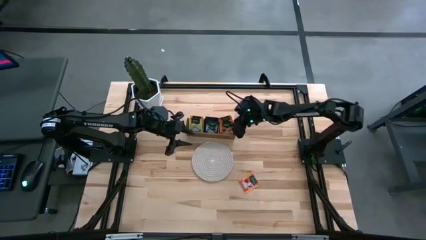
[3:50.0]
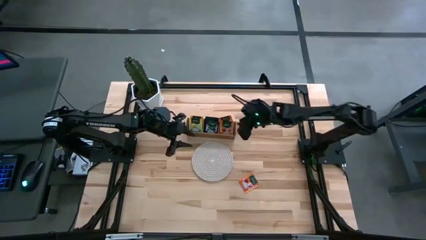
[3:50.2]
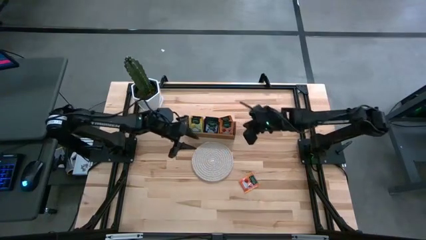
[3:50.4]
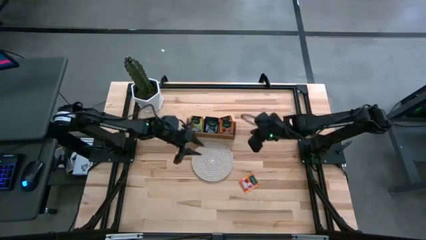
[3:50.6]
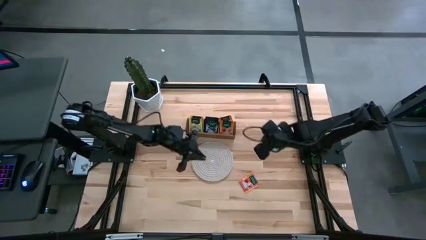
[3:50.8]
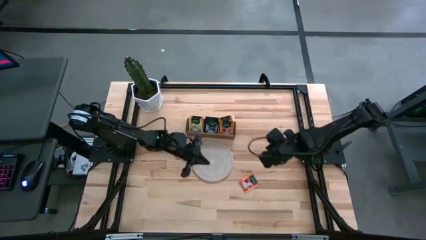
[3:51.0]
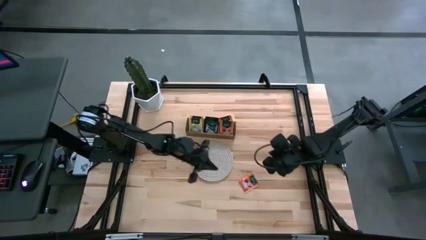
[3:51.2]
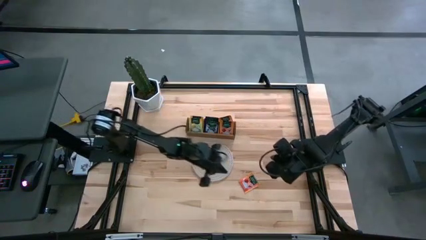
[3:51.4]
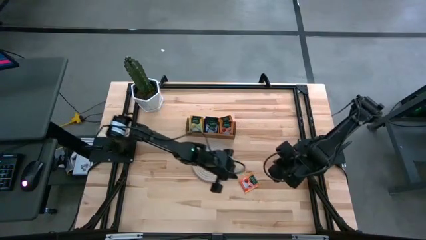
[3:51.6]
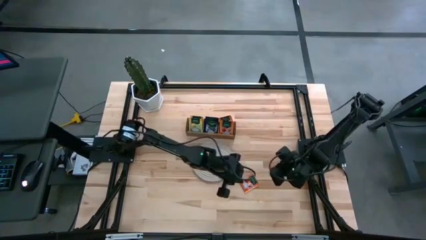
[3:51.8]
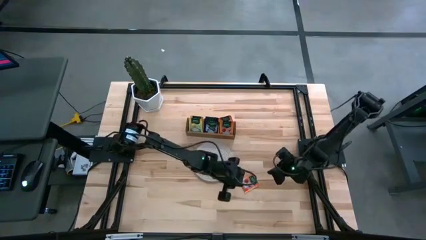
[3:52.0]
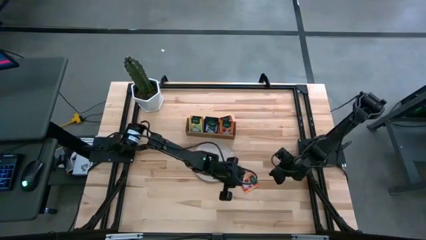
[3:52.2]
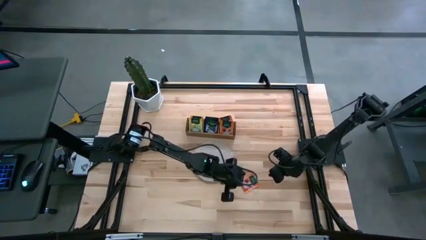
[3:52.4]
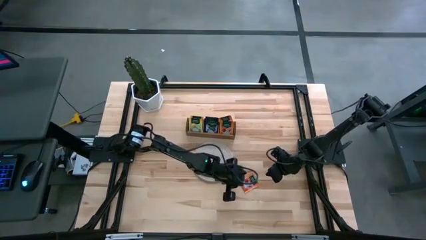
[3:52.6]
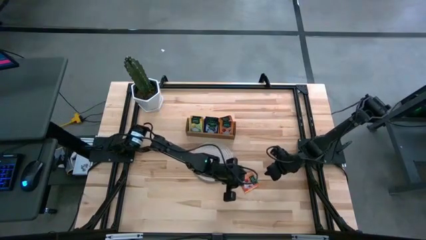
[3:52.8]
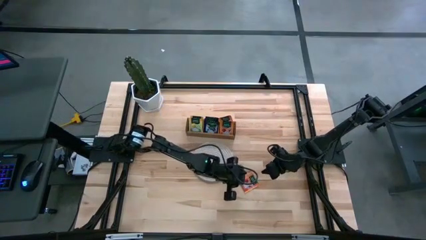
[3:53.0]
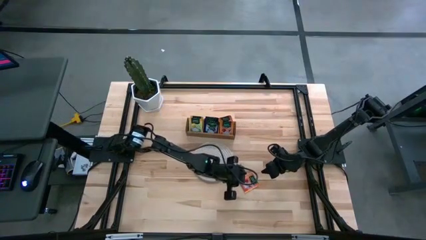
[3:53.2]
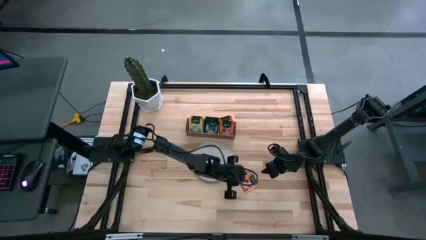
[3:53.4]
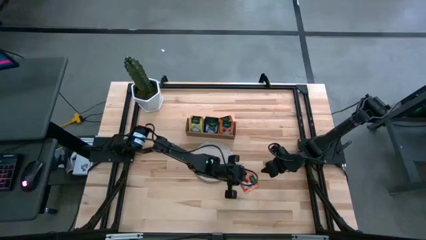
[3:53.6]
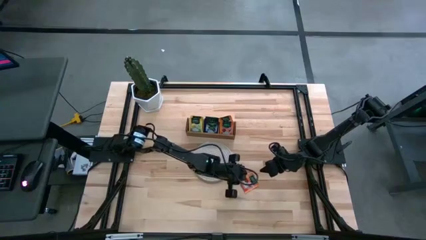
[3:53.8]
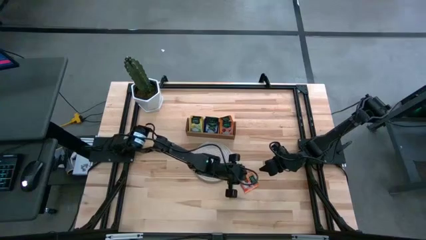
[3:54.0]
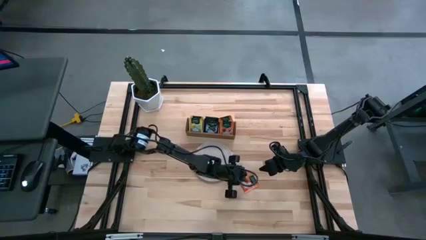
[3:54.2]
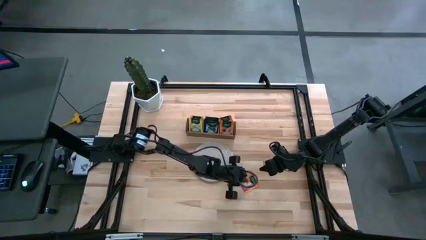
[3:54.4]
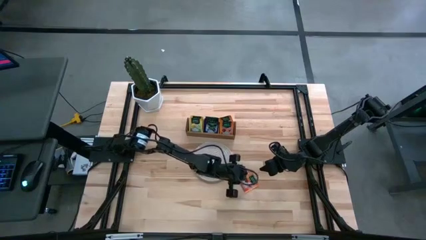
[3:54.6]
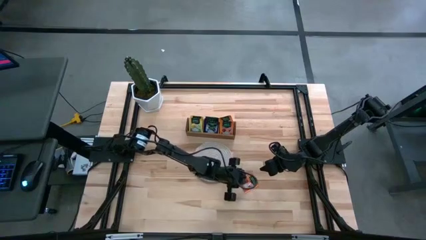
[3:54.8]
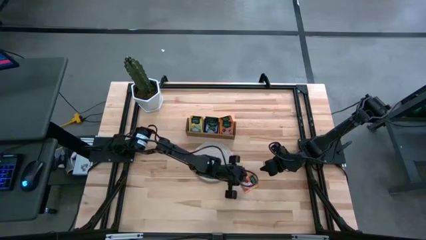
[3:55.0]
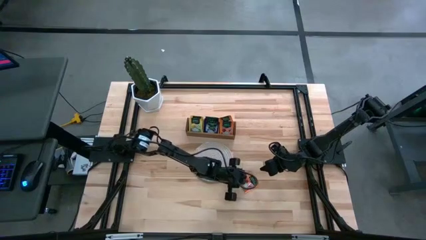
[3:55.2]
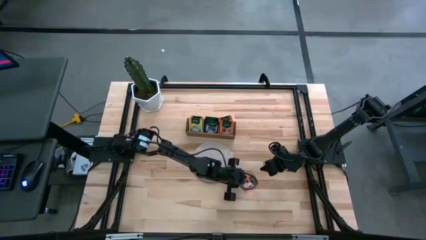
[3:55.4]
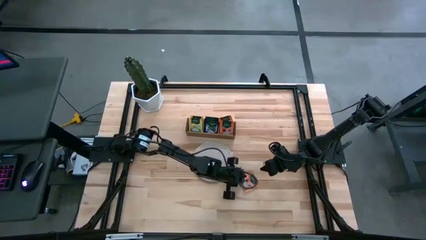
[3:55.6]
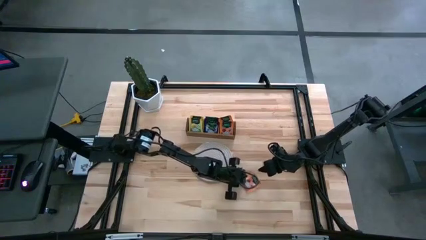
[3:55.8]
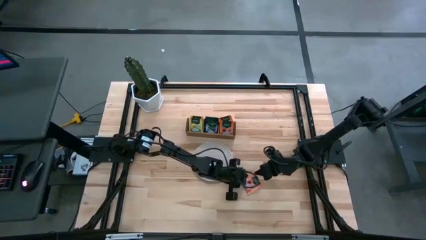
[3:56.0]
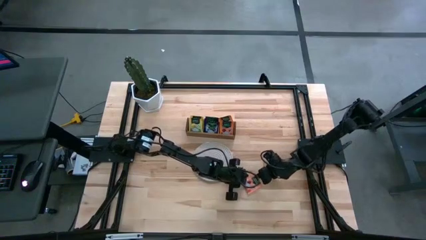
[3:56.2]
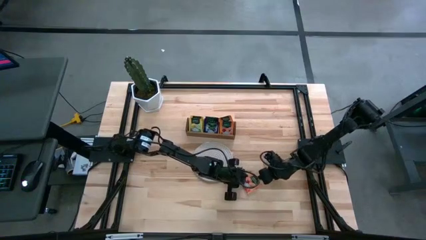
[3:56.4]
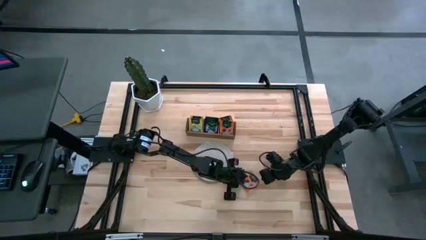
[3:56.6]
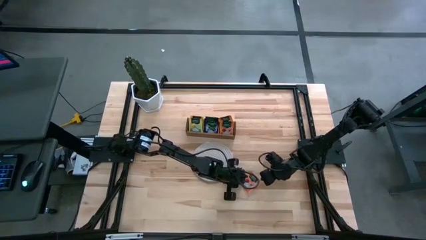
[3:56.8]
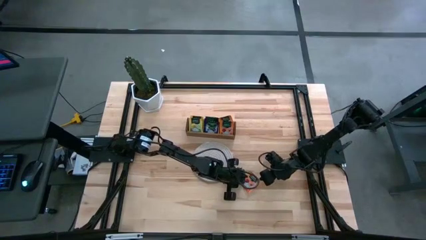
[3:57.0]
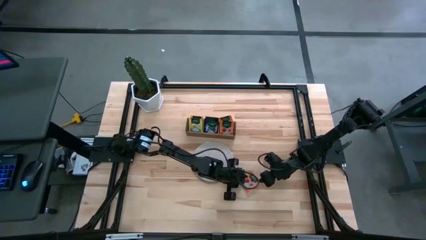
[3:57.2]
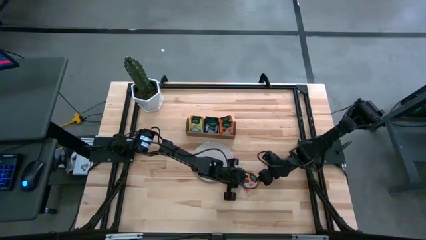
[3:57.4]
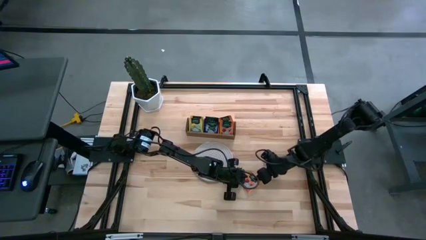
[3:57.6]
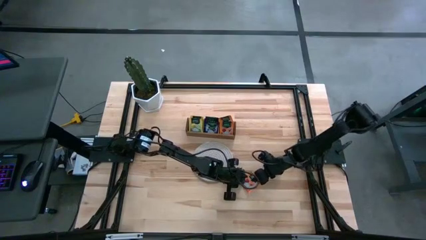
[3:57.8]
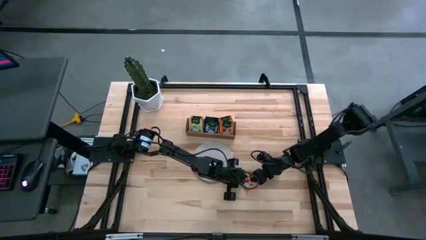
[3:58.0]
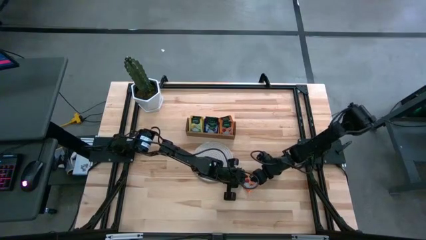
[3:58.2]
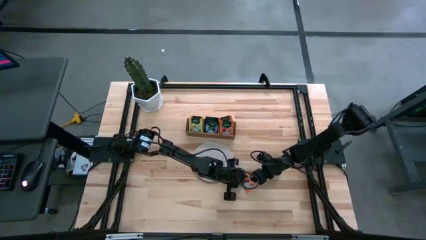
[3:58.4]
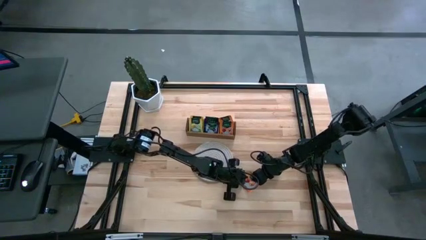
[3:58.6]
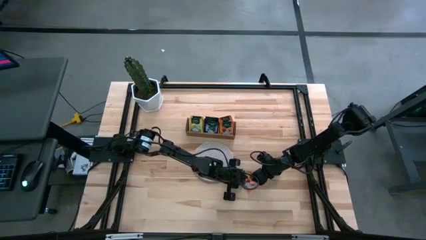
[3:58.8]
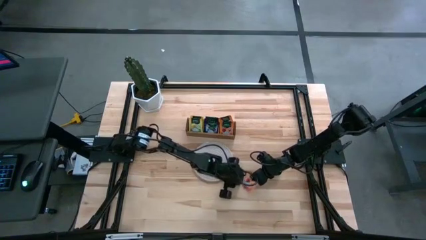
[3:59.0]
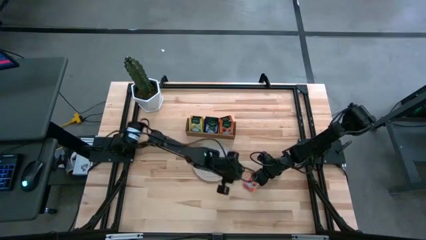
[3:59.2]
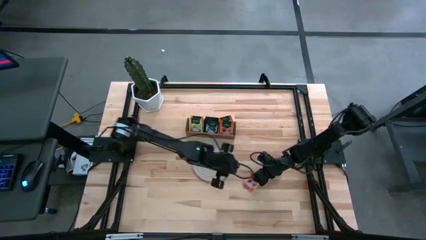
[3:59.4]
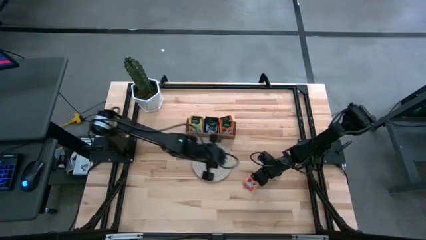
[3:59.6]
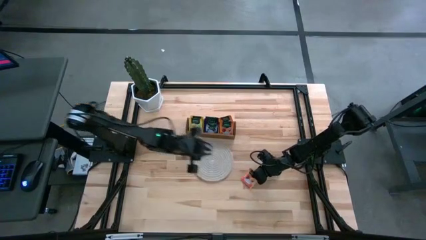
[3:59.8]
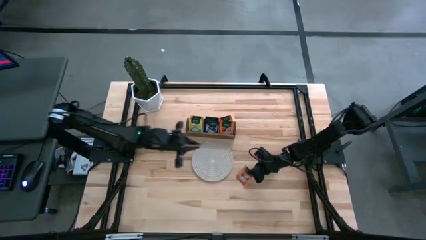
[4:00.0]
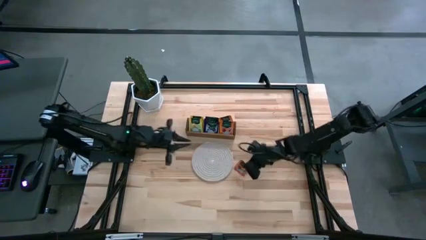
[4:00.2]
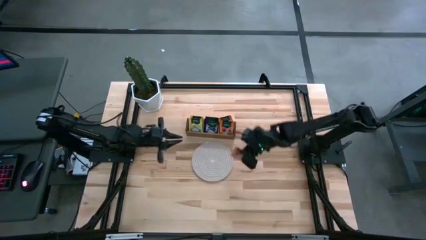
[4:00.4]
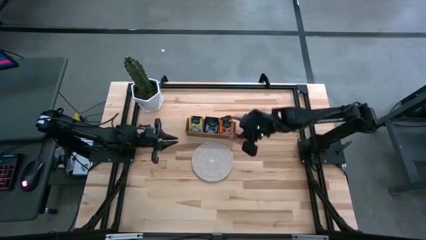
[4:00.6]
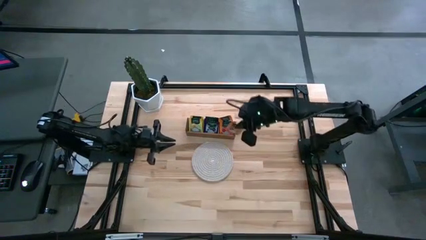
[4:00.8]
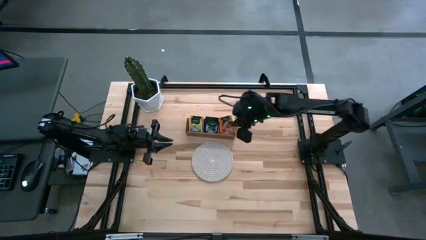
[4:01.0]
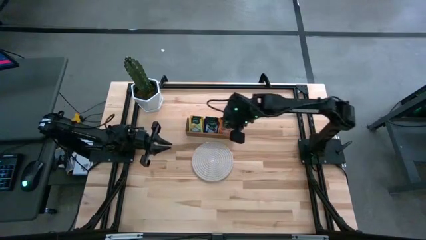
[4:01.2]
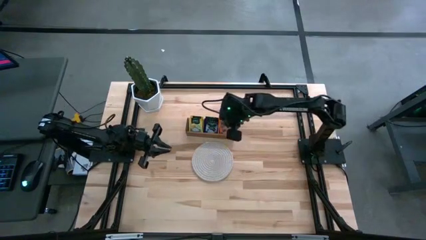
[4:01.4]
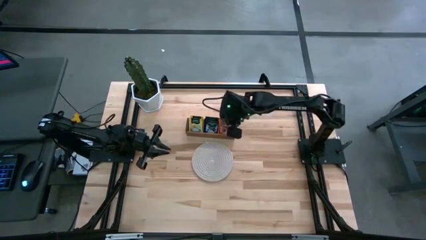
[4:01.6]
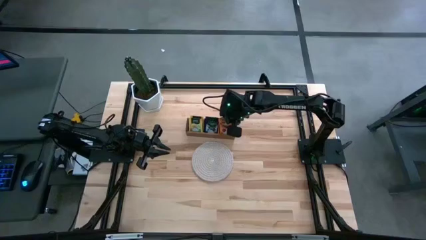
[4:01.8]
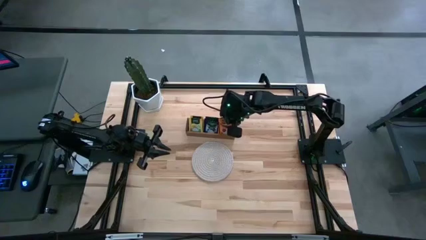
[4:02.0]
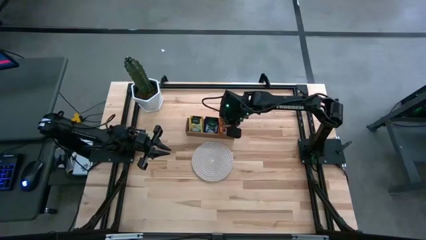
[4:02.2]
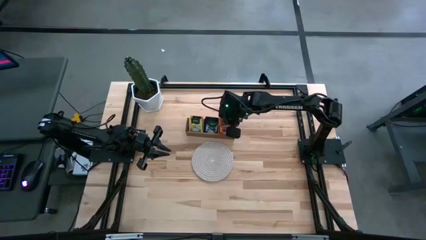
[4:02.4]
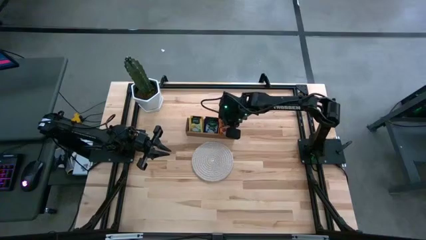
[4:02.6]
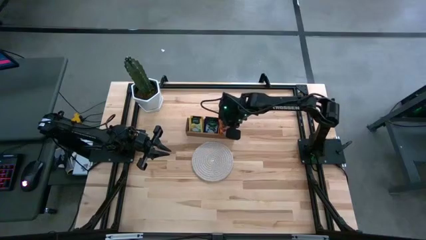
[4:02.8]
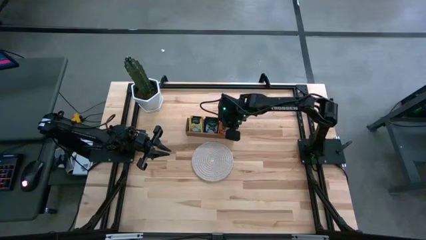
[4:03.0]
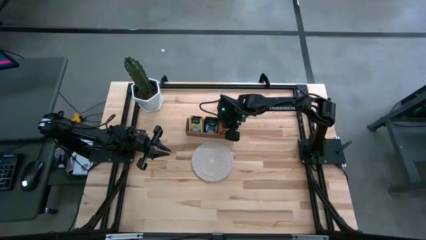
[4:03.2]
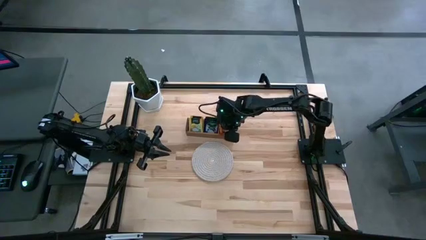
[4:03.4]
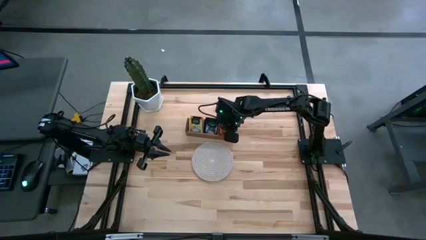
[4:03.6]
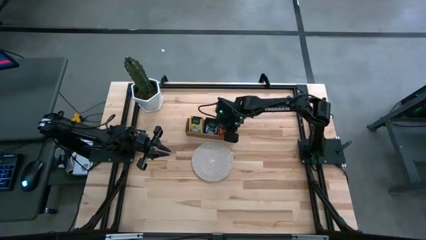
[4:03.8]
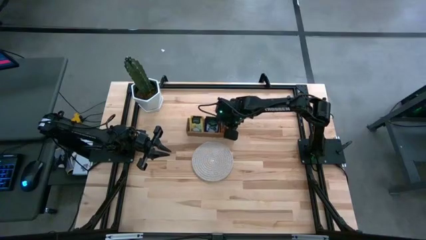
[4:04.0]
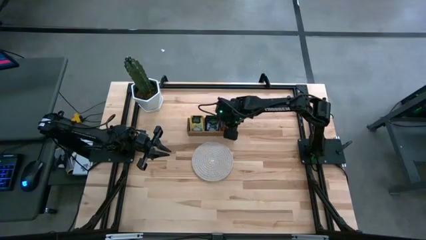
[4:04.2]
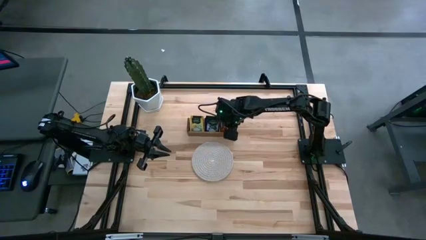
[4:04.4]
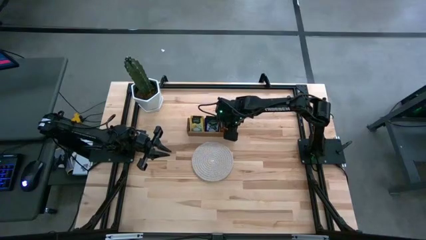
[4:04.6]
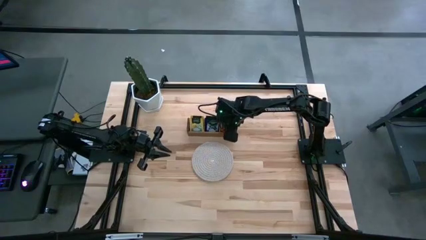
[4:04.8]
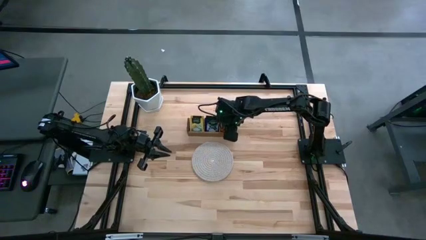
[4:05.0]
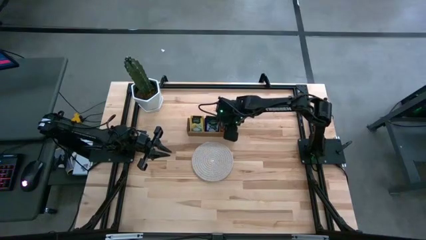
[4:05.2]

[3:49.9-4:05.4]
Task: Pick & Place Tea
Put the orange tea bag into the right section of the wooden organizer

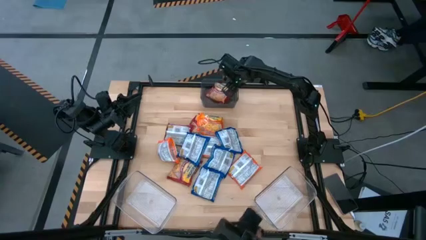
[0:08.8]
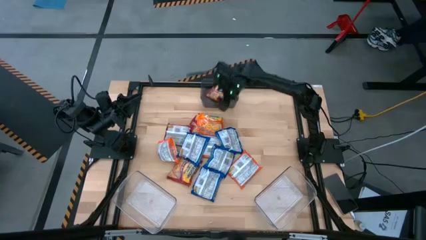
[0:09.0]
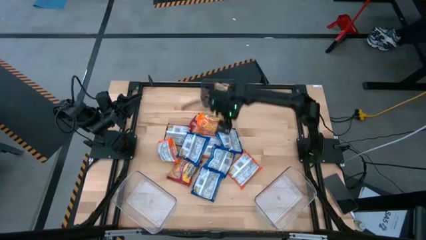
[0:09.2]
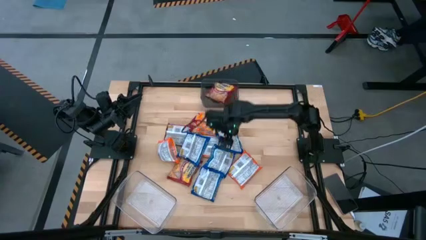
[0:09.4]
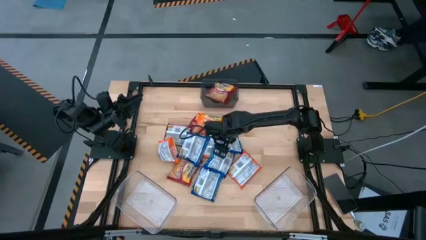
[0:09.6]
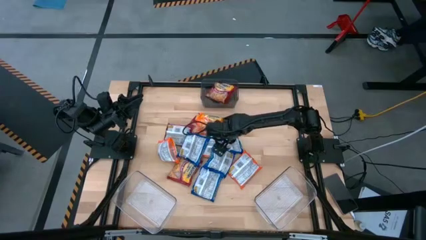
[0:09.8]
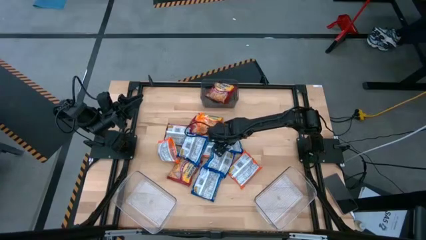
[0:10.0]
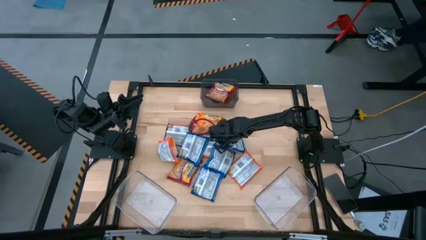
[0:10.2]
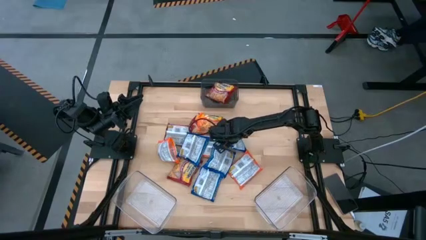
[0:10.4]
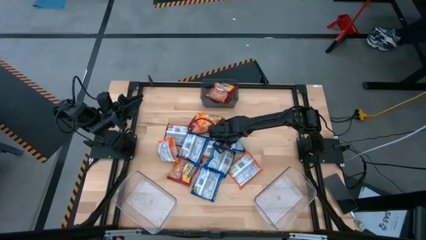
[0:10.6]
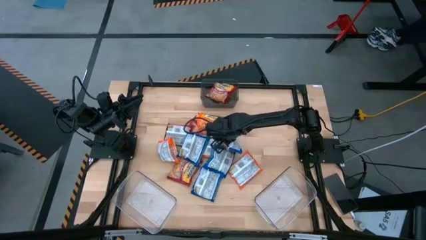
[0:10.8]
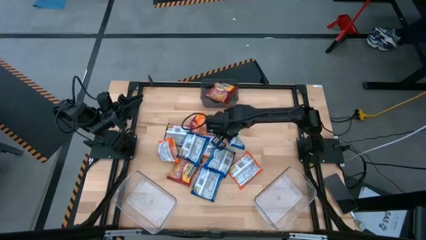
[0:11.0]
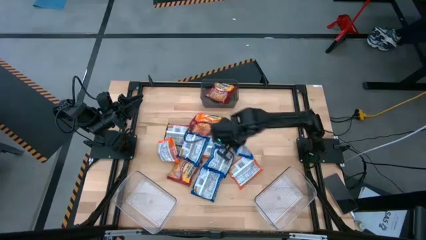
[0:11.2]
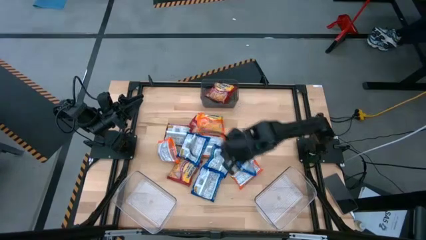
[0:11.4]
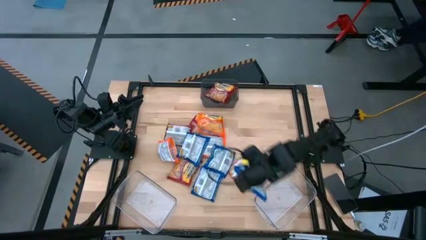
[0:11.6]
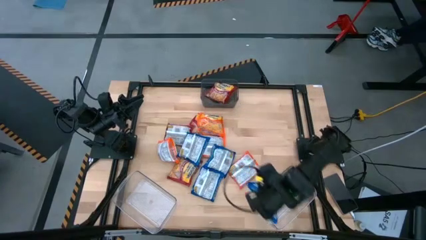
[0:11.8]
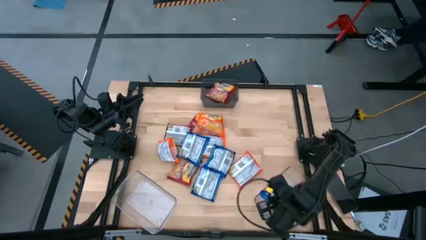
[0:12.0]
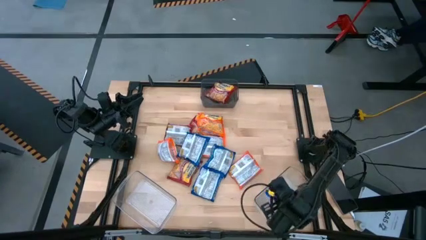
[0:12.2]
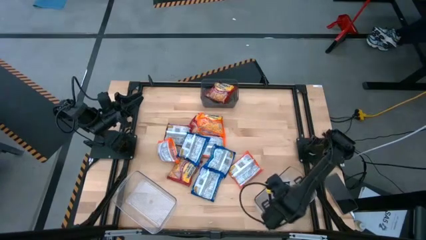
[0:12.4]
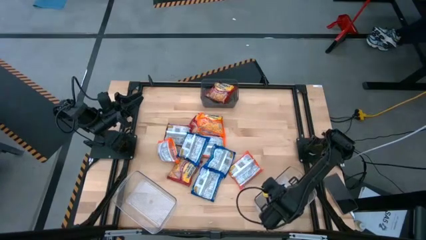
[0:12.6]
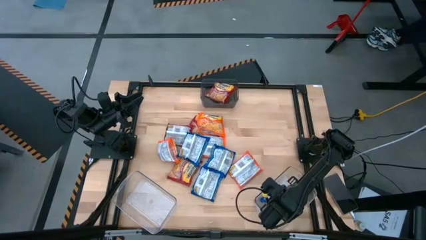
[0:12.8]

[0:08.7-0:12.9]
Task: Sort Maruchan noodles
Put the blue noodle pack into the right transparent bin
